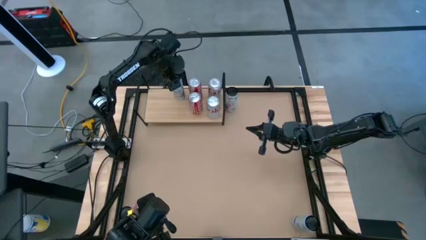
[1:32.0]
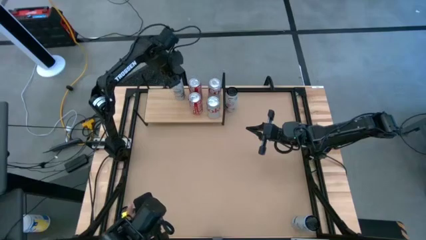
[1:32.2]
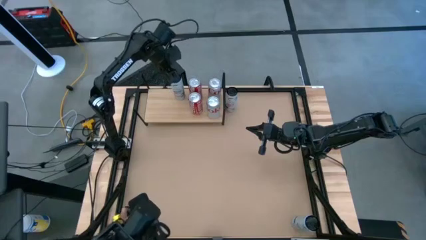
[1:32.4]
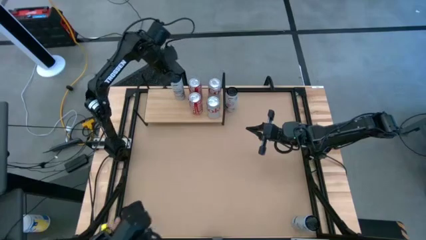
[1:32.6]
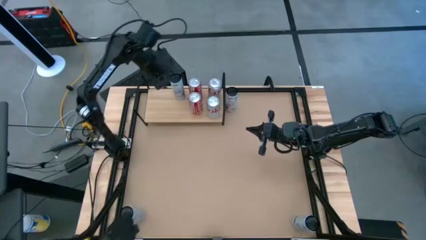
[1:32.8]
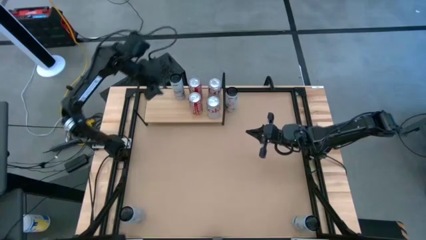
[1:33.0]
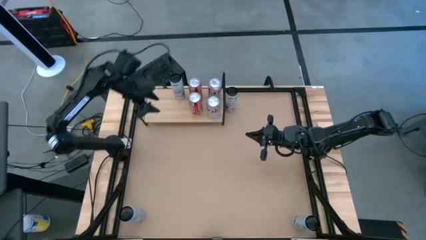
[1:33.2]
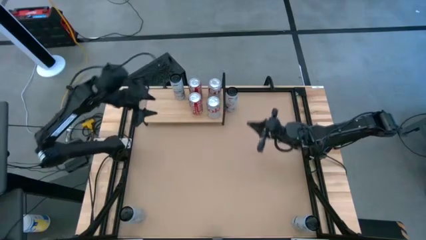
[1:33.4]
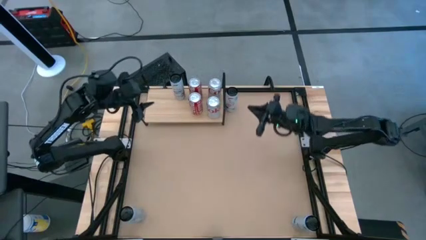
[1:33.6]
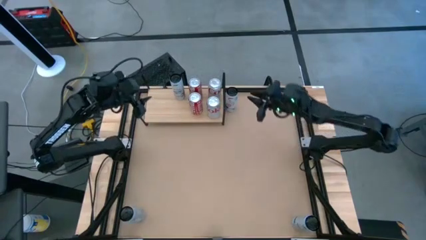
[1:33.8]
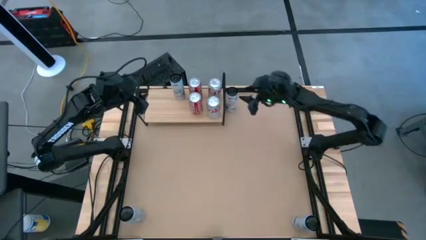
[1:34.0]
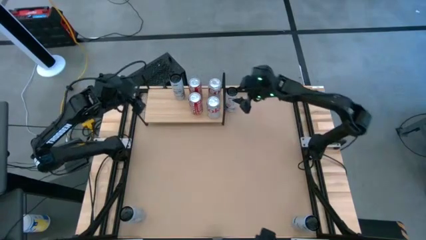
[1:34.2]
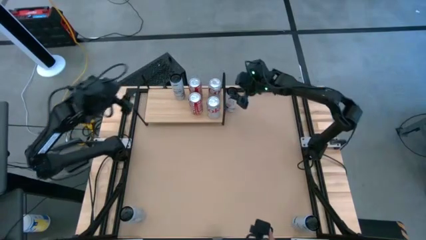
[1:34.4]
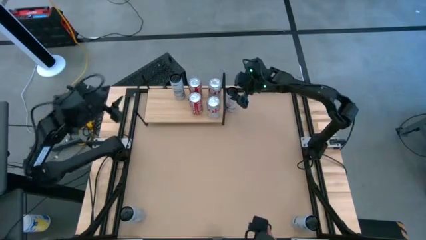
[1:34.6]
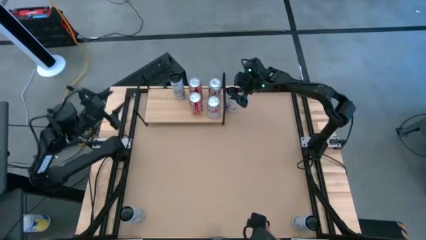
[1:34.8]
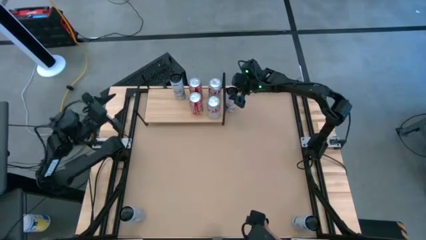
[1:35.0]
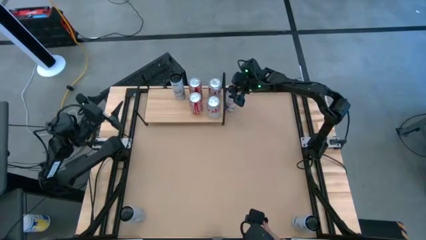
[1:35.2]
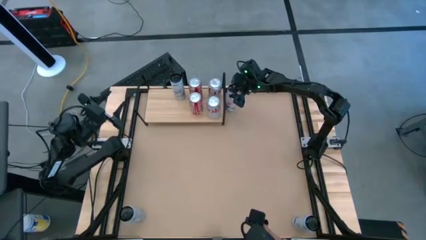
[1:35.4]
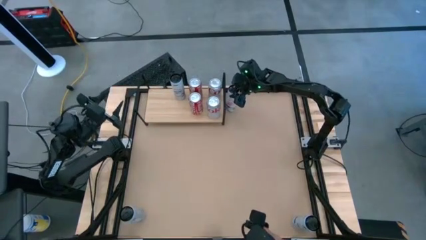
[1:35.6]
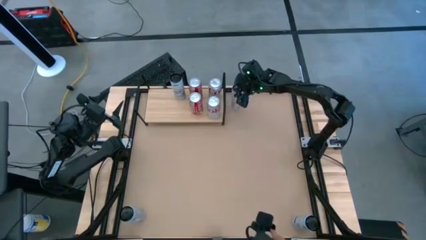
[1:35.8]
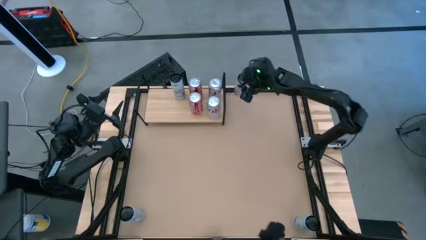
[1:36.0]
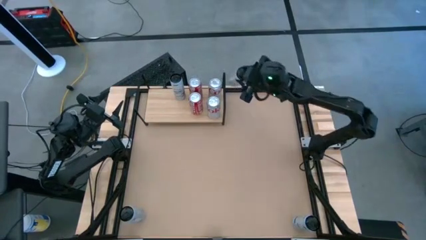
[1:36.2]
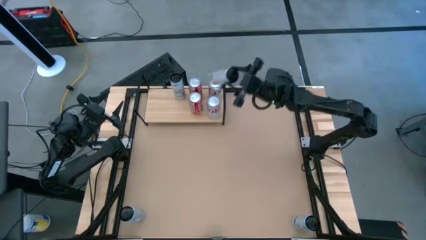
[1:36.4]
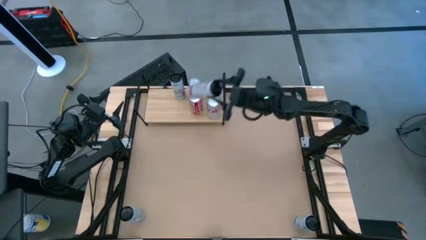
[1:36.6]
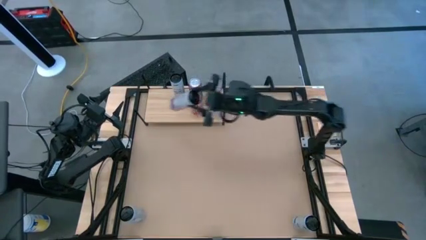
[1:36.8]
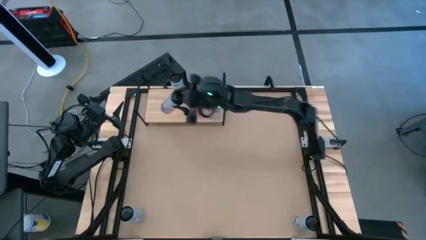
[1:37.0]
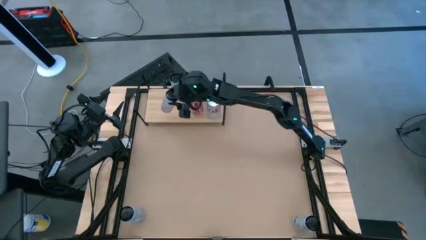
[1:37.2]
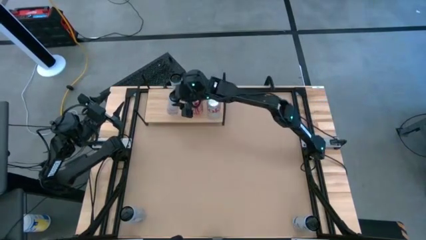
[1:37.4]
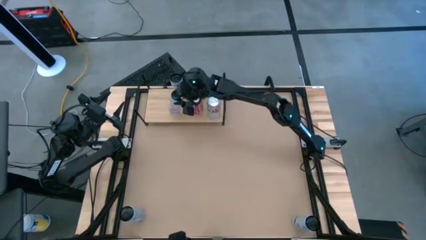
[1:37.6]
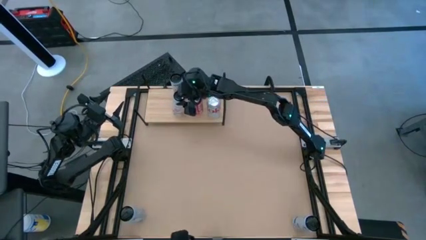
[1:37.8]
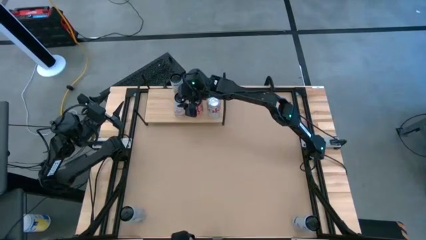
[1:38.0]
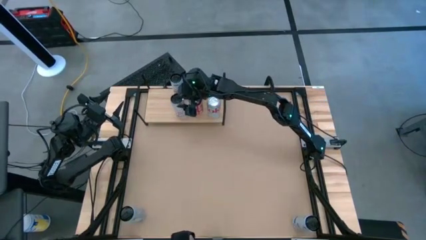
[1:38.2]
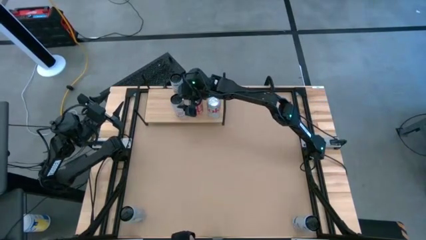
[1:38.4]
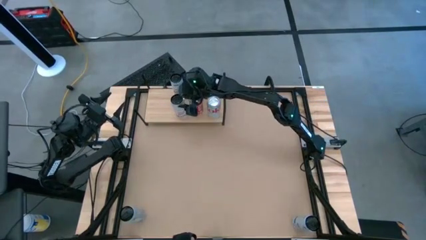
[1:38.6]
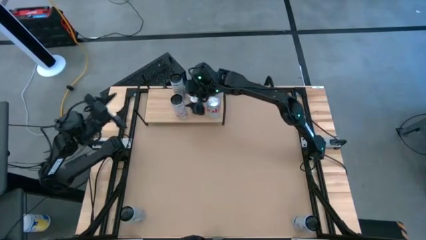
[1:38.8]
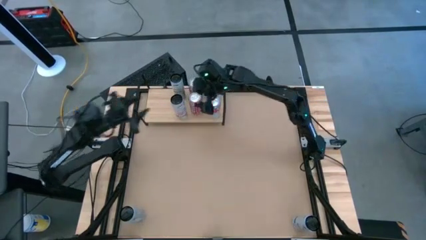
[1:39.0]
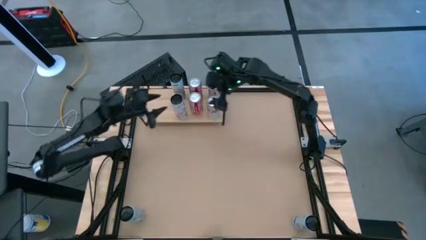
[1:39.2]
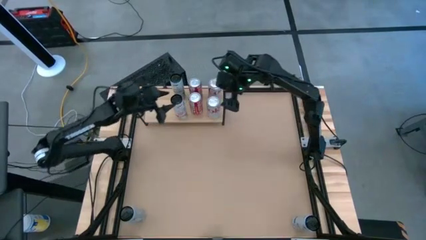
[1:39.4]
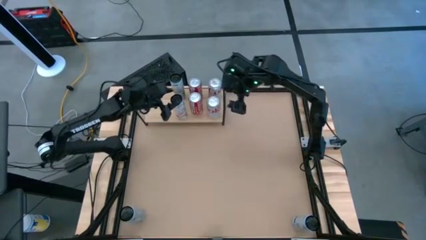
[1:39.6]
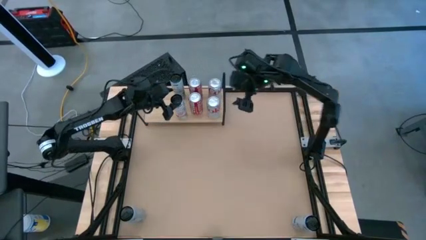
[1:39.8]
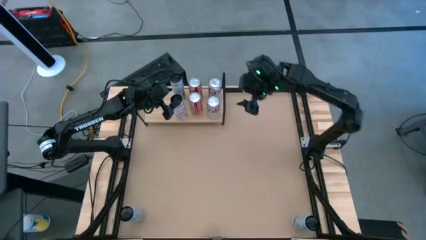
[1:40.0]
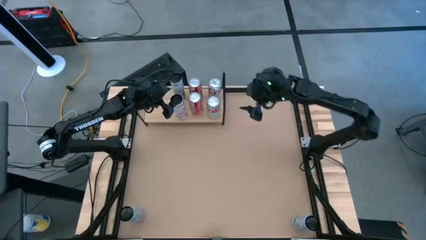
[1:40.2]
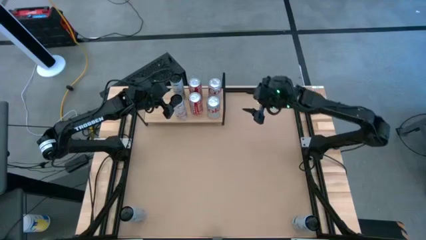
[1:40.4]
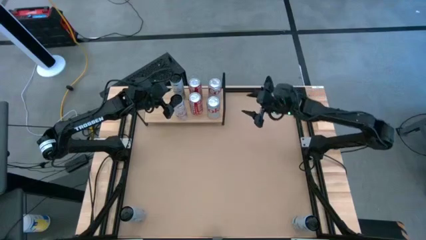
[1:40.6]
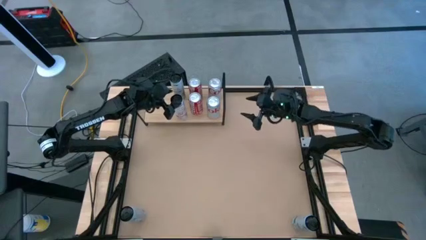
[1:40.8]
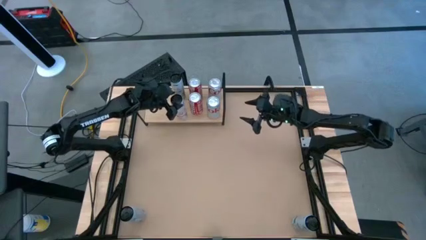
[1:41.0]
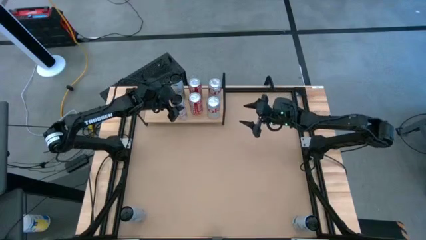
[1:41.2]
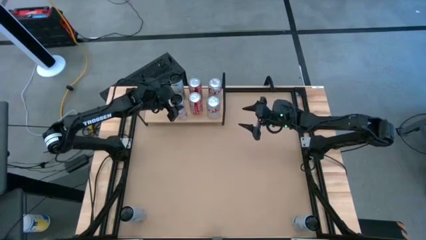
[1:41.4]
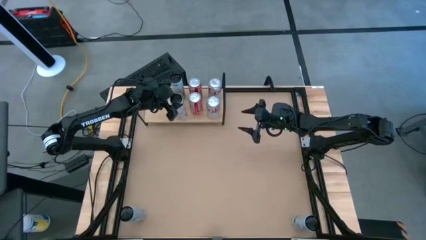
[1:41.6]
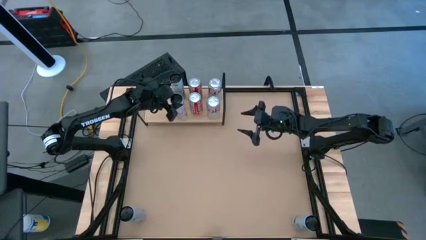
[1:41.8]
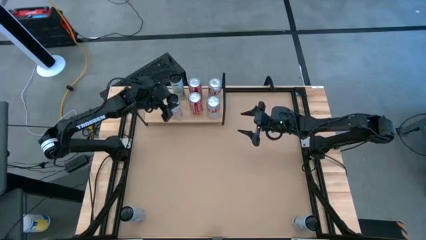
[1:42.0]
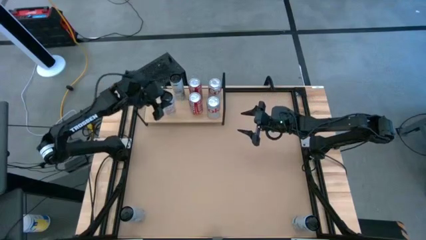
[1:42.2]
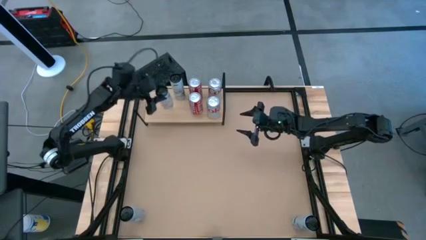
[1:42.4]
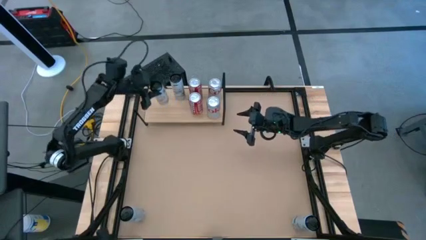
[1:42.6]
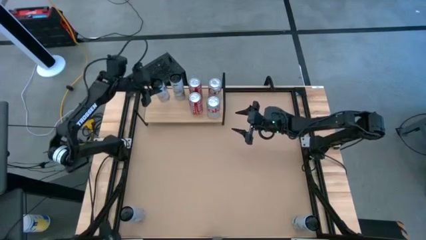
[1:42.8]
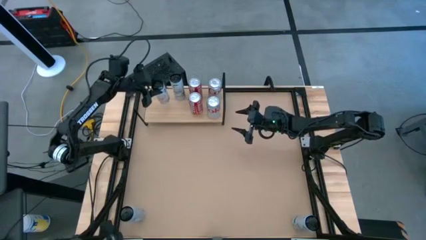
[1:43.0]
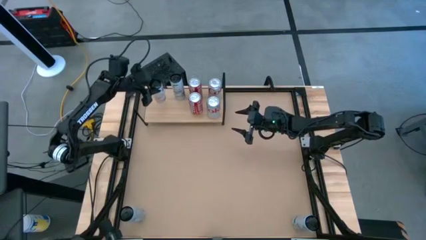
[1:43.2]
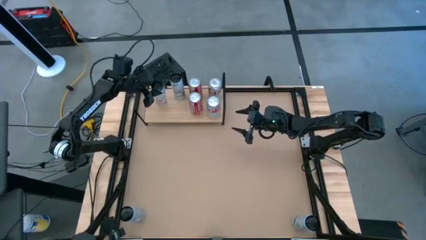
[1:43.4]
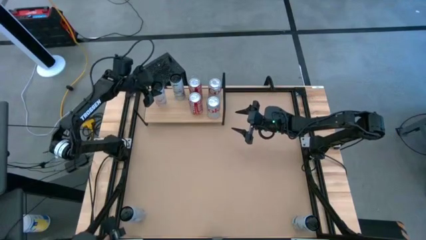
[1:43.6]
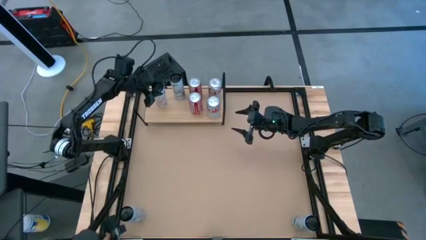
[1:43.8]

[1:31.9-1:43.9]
Task: Place canned beverage on shelf
Put the top white and pink soda can on the shelf

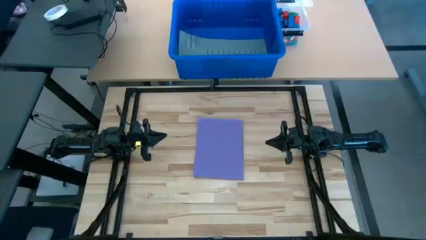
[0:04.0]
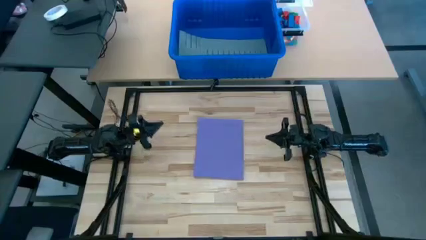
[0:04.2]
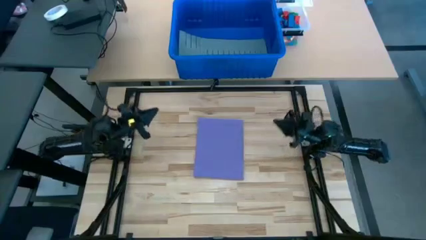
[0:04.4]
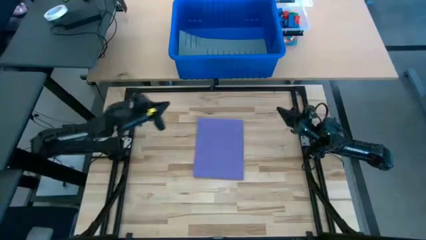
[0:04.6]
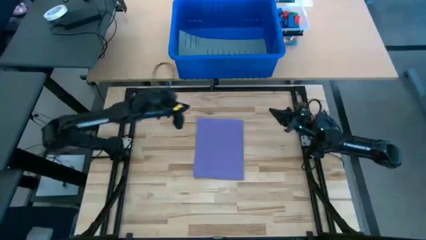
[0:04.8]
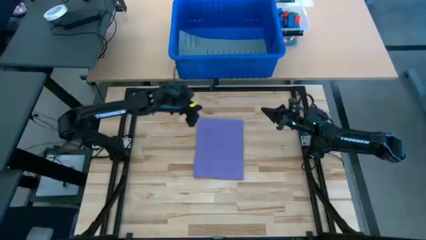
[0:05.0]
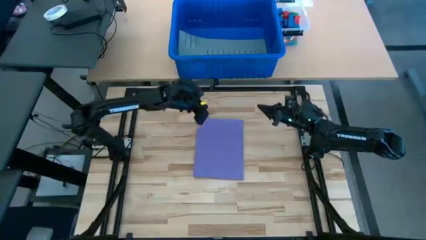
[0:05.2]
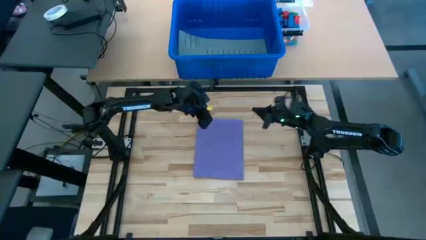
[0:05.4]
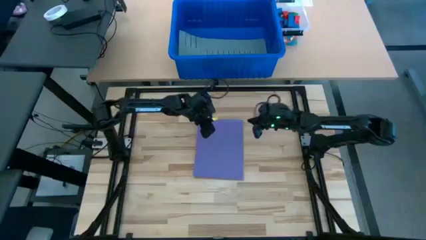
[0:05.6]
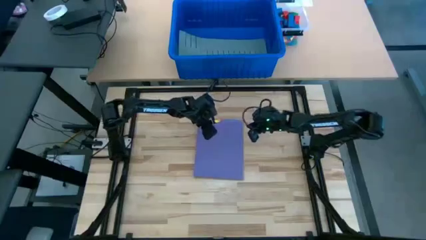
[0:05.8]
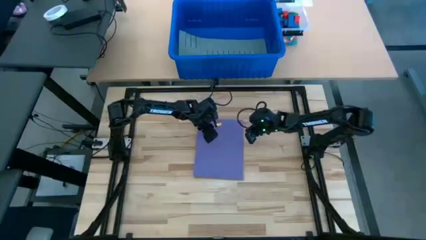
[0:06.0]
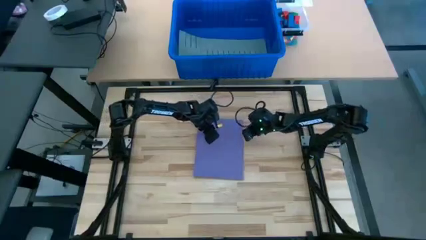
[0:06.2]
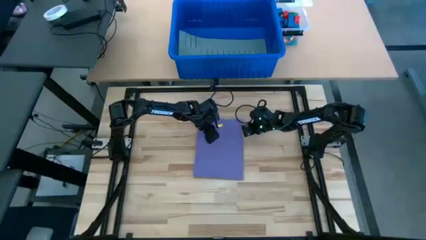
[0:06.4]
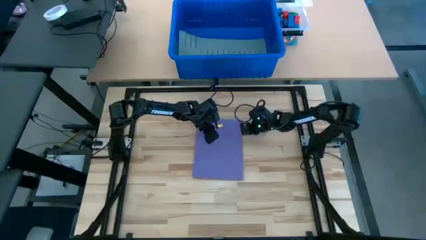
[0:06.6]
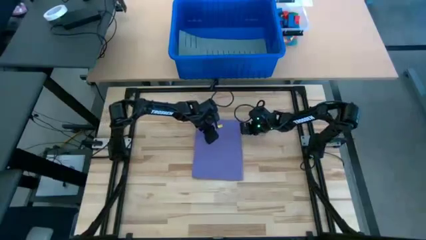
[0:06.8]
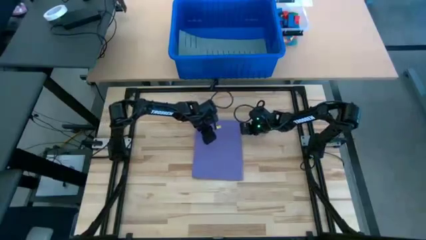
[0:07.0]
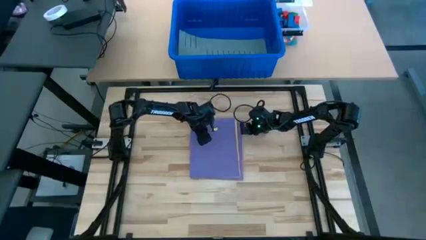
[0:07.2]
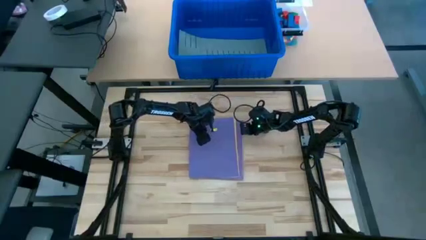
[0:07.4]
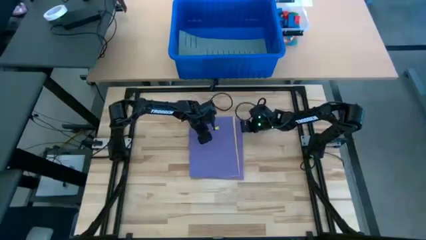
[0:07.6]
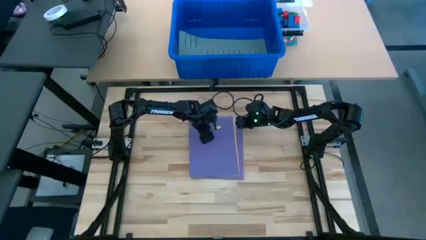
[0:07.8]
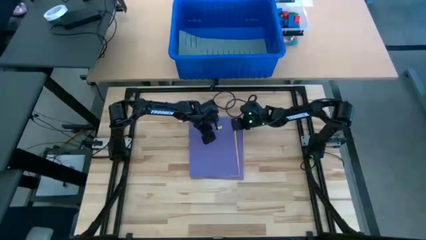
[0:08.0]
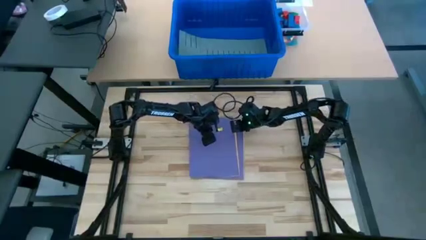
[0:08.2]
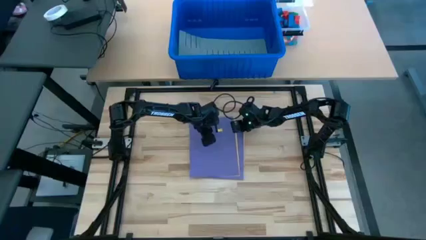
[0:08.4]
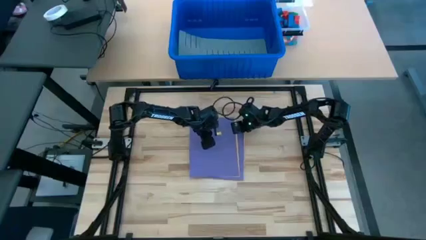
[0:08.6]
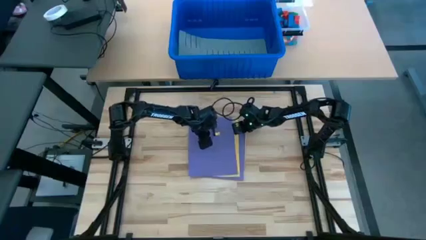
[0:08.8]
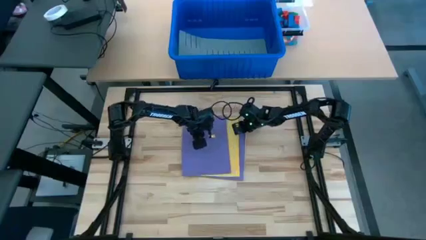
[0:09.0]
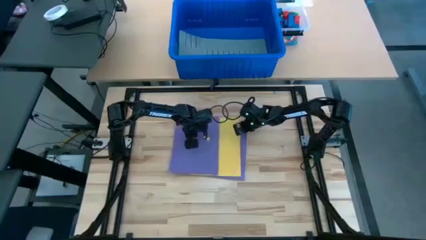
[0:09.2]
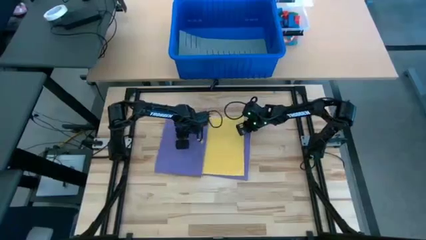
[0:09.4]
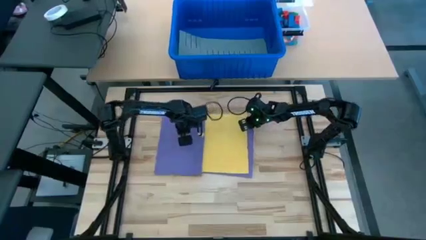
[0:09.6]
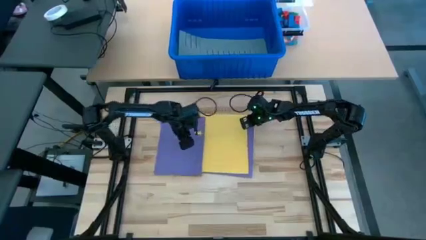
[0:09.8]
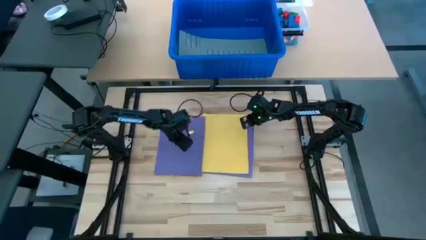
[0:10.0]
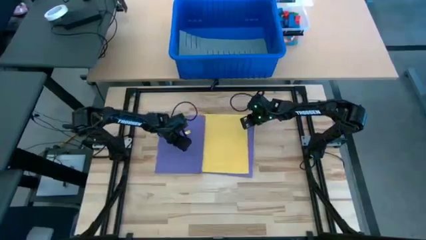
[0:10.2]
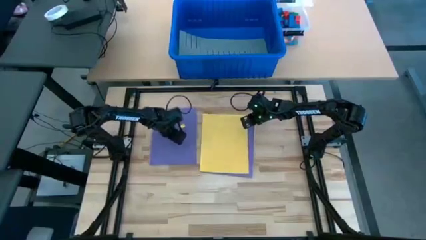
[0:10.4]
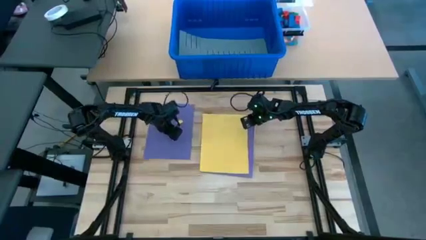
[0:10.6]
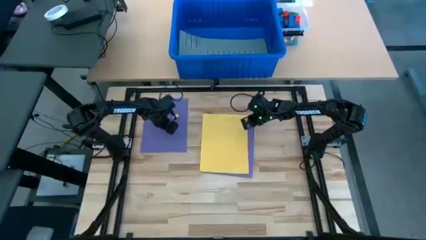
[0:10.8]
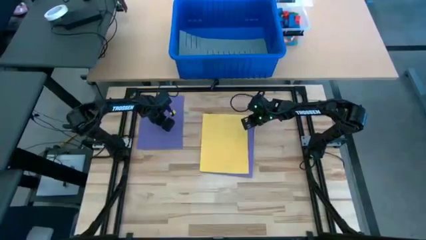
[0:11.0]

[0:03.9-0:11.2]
Task: Organize paper
Prepare the purple colored paper
